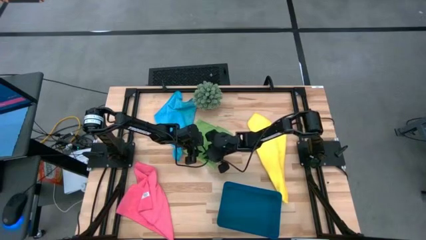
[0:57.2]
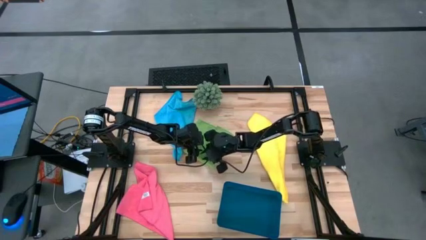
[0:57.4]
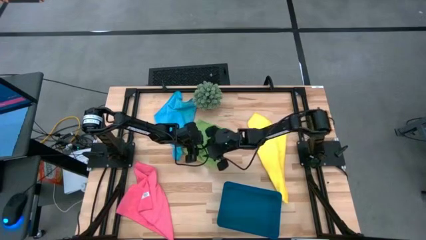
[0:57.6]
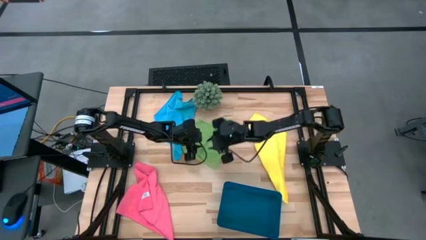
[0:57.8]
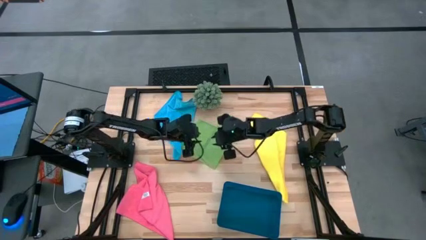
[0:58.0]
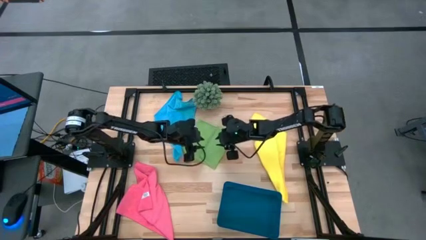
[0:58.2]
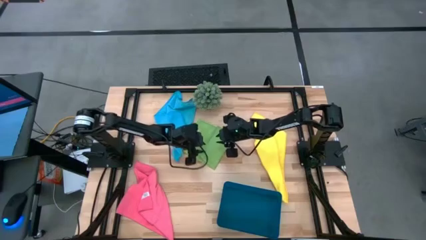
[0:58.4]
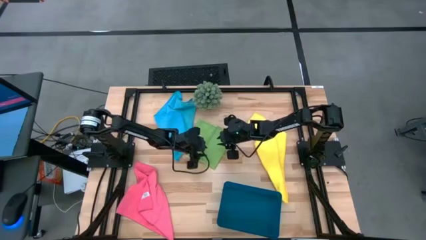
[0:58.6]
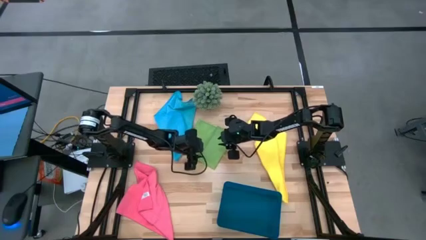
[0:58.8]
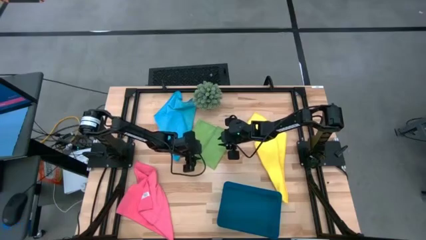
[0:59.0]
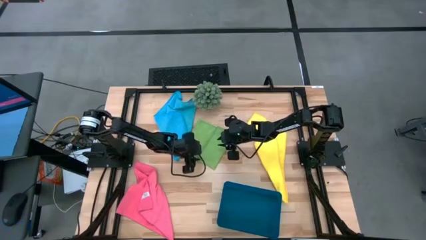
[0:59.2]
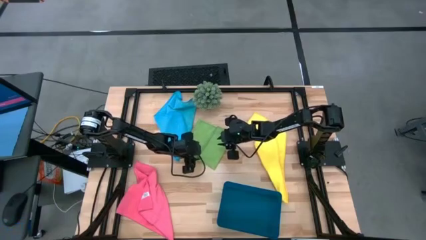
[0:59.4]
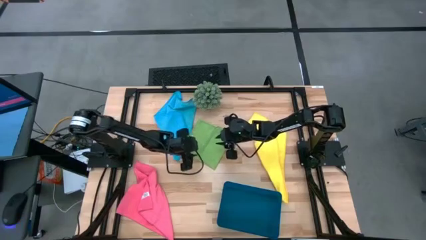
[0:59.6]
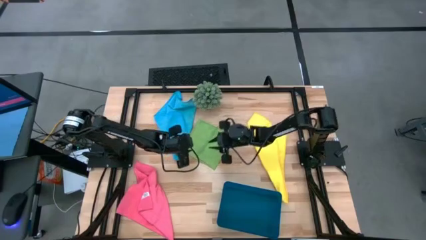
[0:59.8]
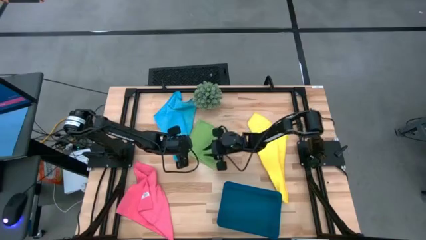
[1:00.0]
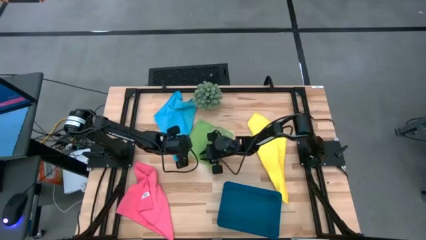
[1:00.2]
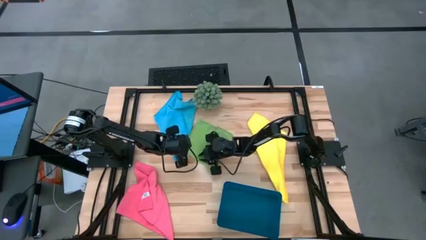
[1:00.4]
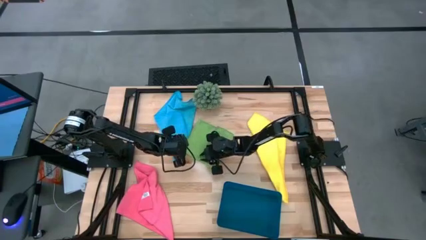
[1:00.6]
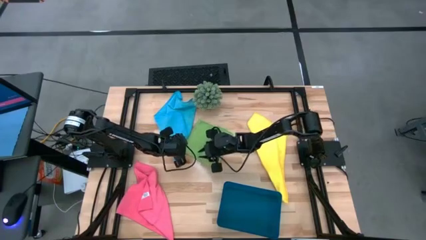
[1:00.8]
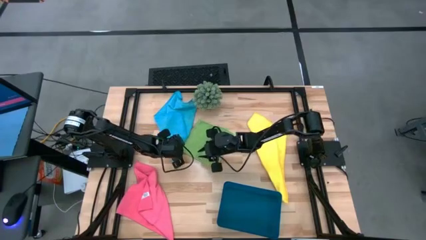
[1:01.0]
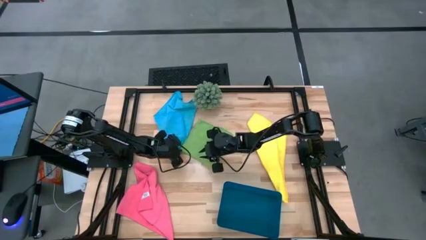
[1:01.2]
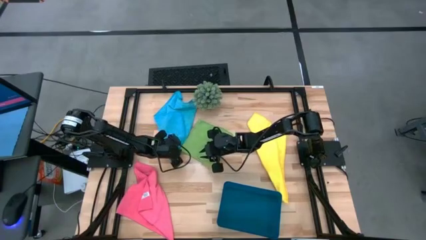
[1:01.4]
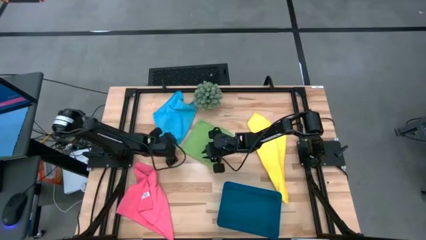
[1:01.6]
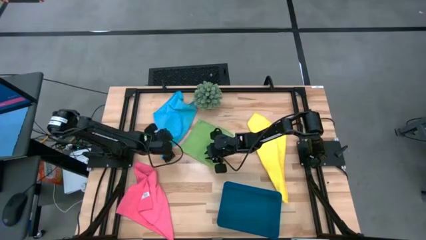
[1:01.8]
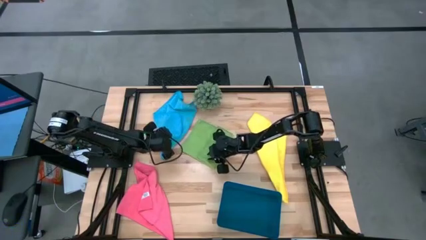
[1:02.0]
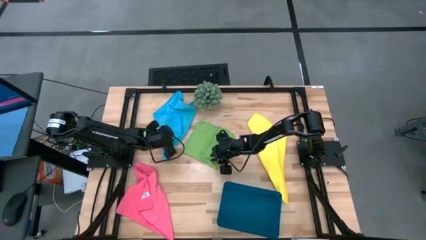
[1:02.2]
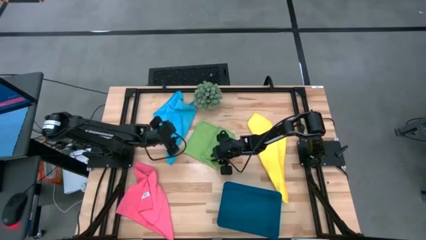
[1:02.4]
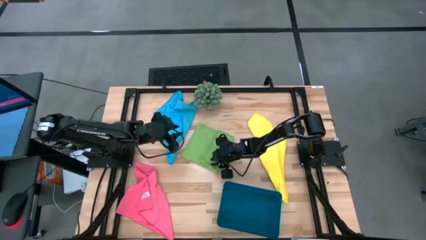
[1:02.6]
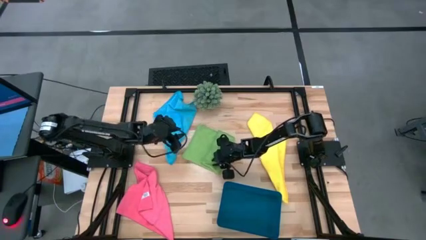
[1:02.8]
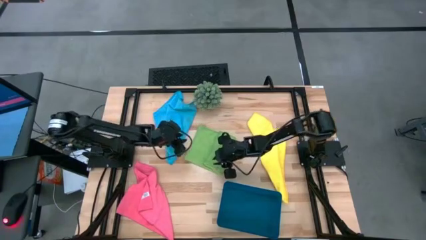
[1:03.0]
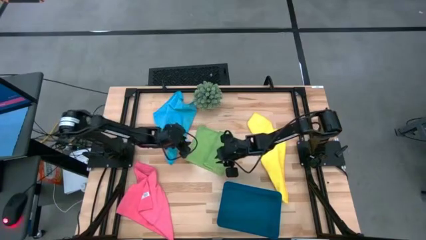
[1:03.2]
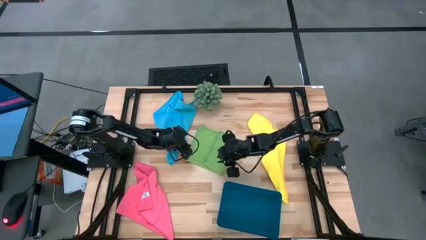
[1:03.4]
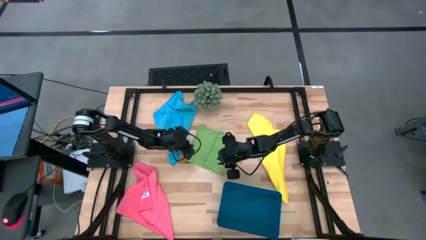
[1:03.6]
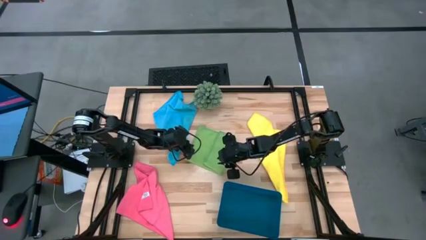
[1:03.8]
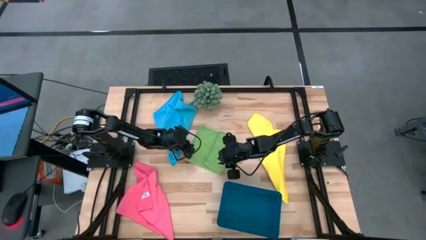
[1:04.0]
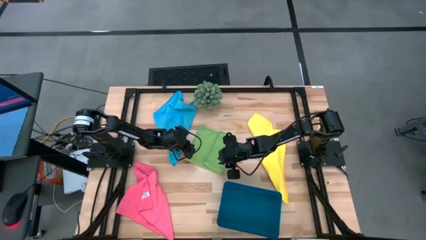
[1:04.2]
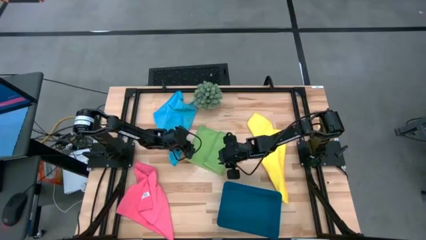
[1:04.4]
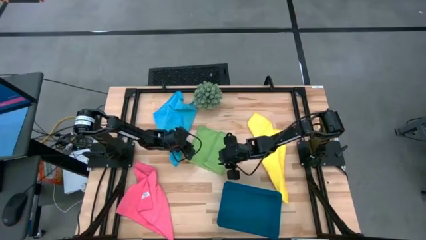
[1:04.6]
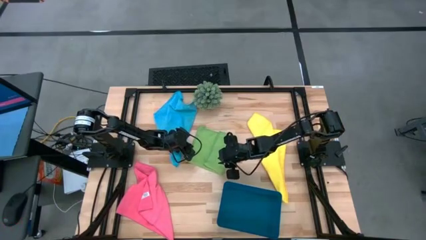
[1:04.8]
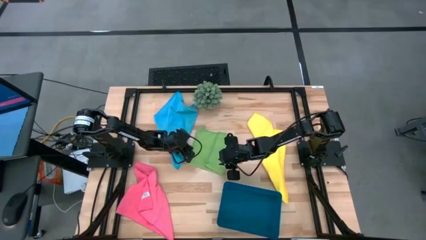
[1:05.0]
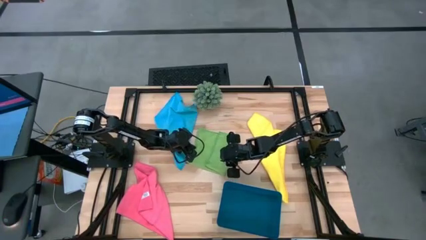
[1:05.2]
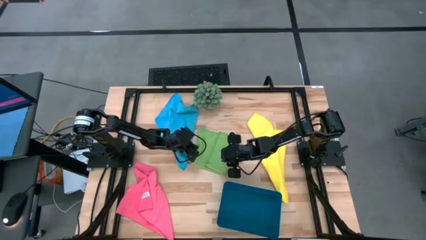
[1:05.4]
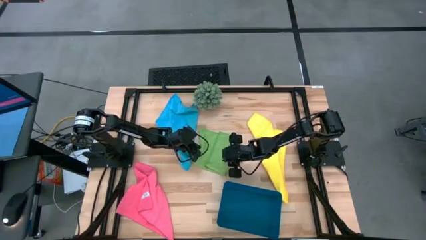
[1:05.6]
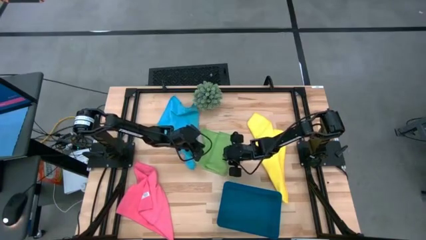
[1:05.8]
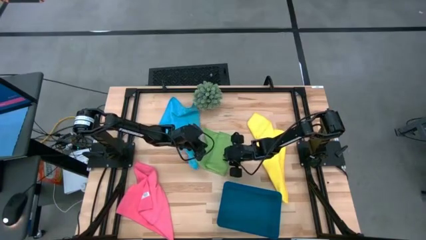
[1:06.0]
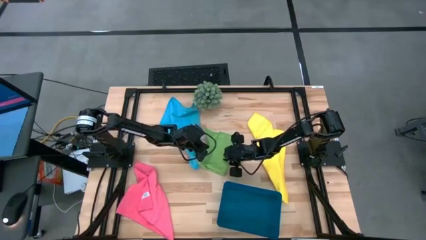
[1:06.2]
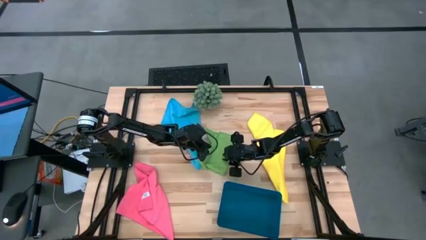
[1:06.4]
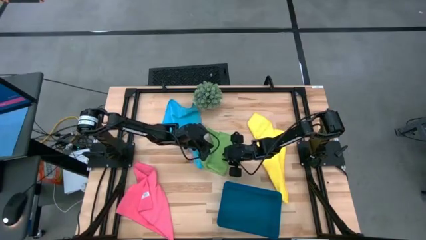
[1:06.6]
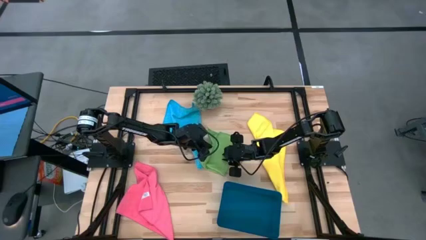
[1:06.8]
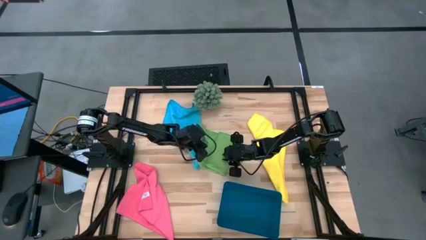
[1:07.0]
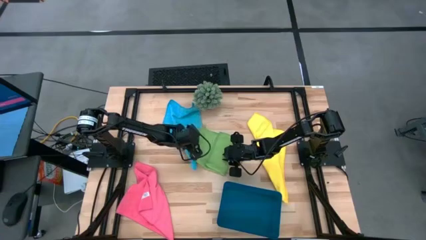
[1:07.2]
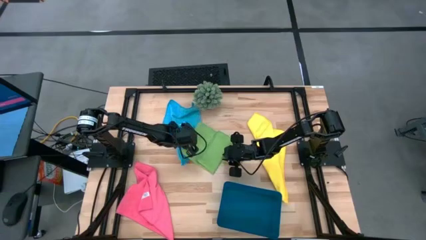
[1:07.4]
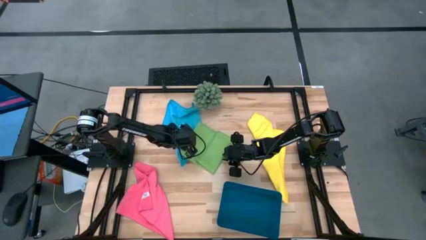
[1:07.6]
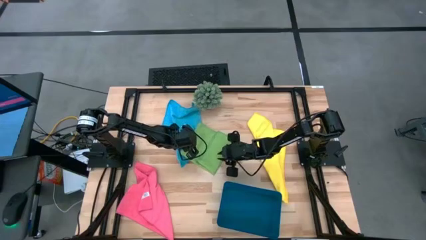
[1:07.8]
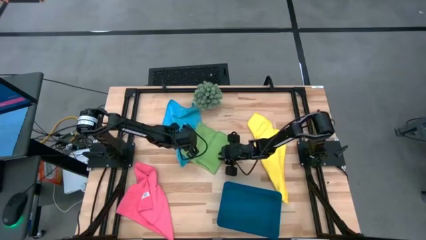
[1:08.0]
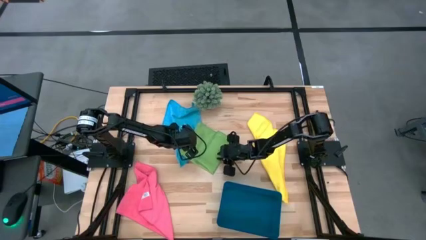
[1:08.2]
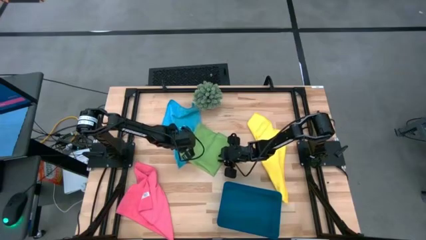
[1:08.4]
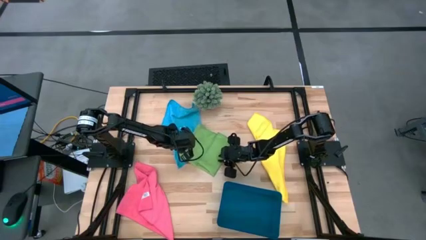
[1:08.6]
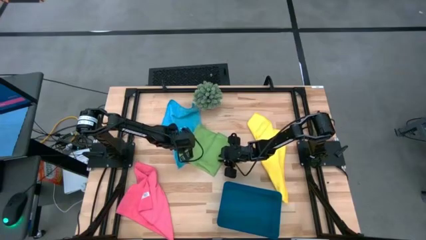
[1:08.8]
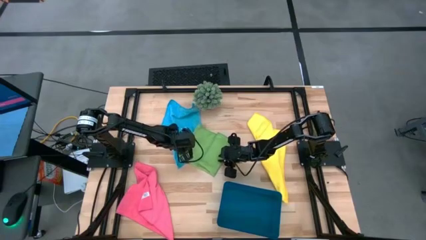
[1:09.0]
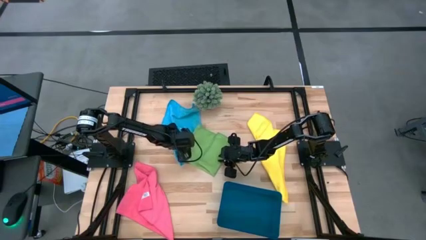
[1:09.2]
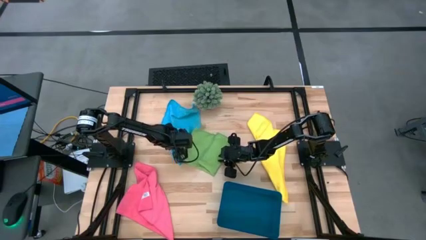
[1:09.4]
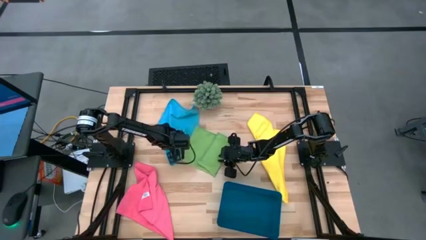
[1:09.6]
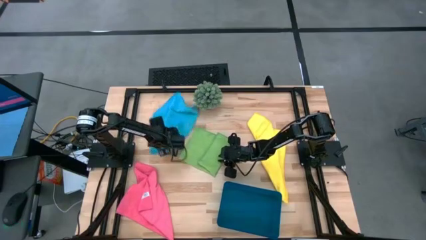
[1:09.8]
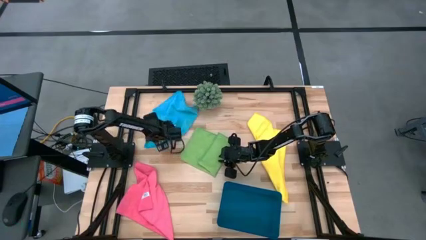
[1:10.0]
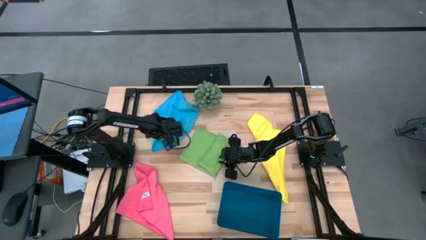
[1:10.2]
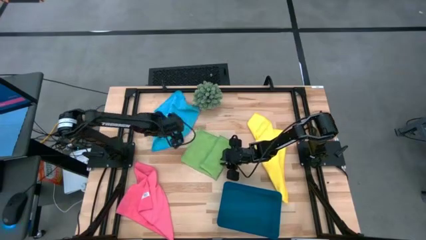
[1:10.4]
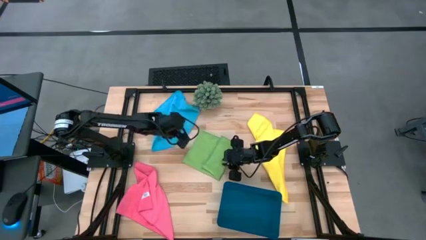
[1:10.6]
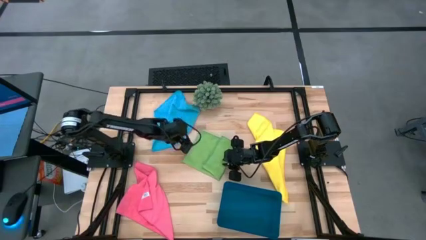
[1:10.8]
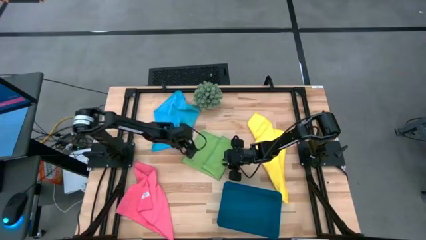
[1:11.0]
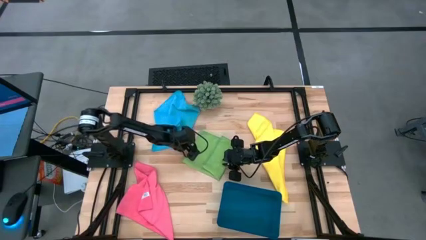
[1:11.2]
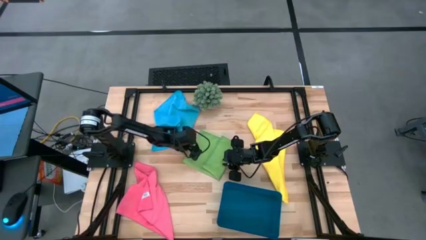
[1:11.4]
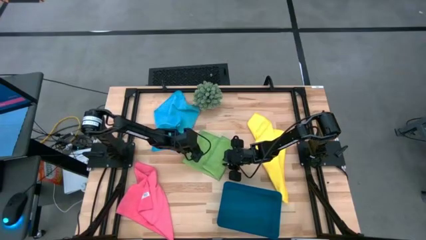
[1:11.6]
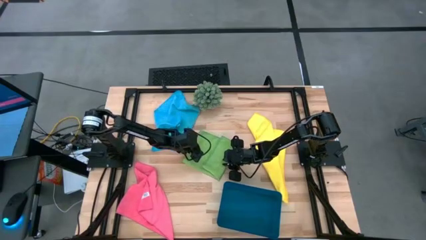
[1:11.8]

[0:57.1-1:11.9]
Task: Fold microfiber towels
Fold the green microfiber cloth

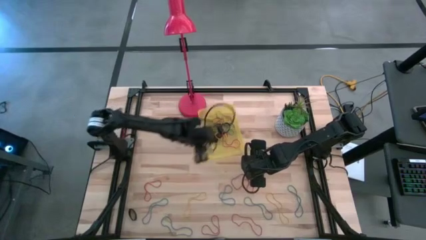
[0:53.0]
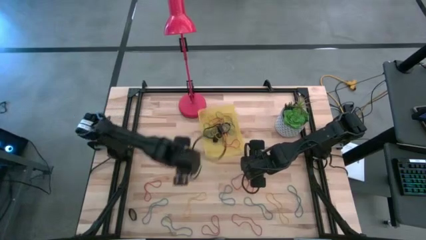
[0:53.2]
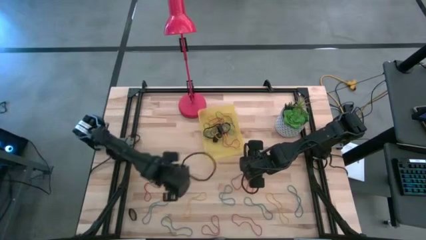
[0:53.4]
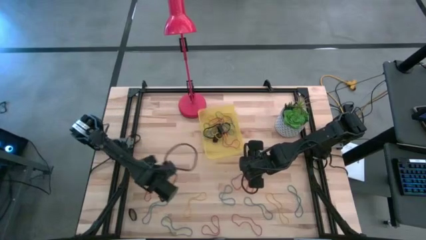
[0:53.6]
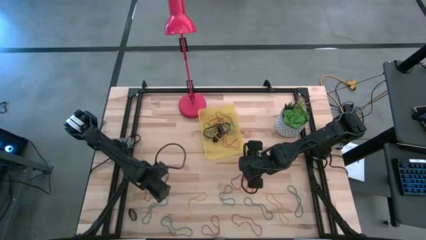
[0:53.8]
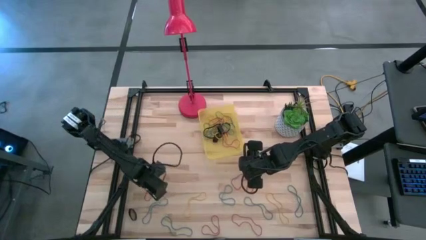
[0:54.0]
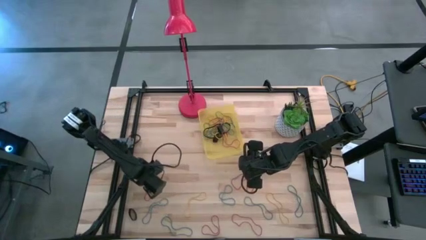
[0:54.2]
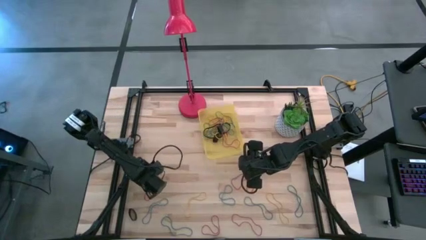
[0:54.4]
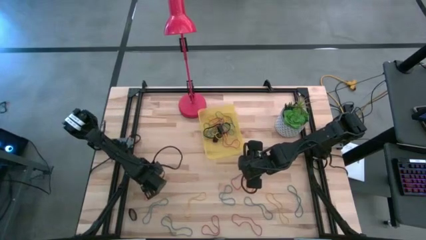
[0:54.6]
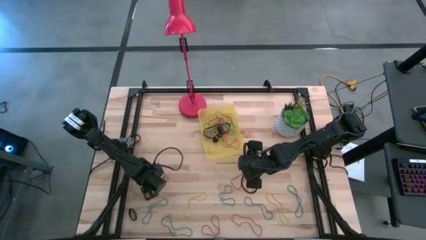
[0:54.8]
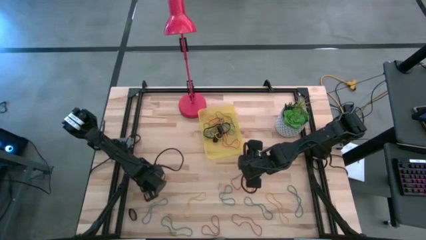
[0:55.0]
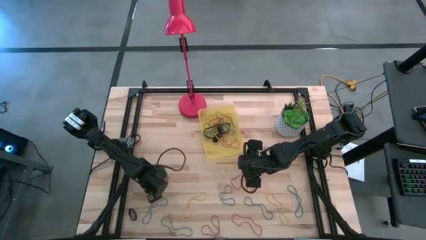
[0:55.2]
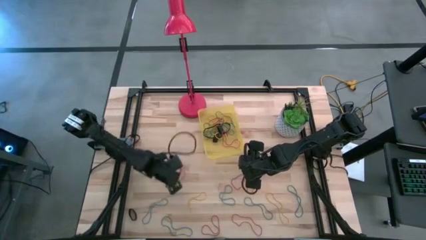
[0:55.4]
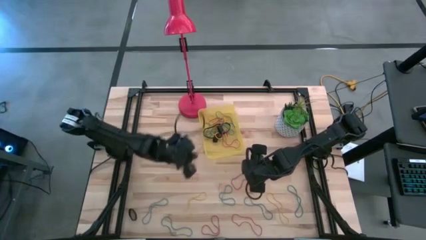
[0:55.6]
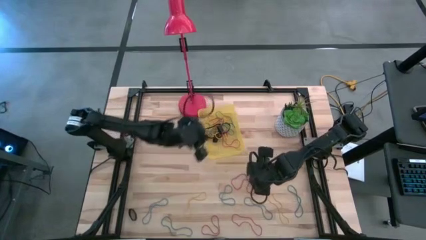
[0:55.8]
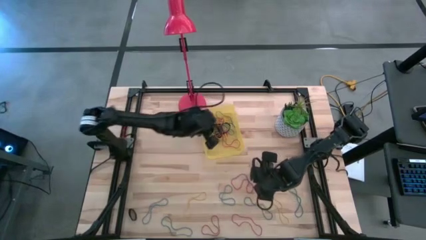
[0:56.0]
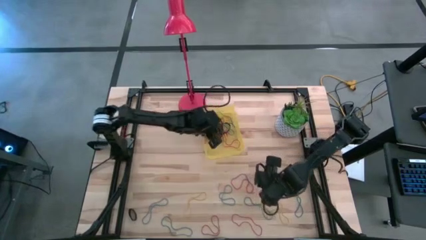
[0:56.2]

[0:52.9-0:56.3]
Task: Pick and place rubber bands into bin
Put the red rubber band into the yellow bin
